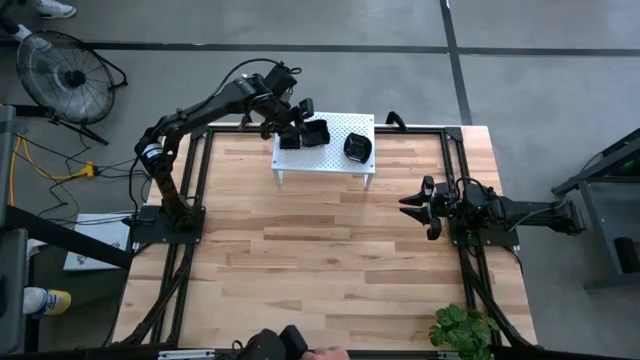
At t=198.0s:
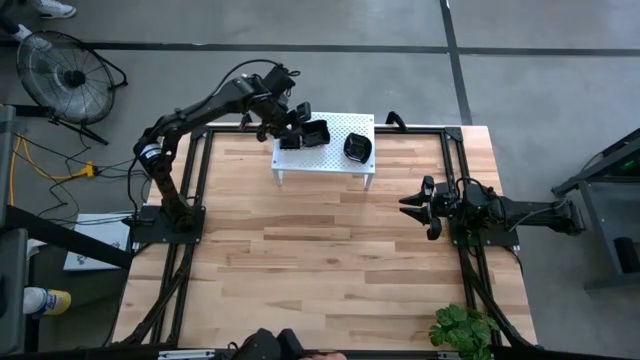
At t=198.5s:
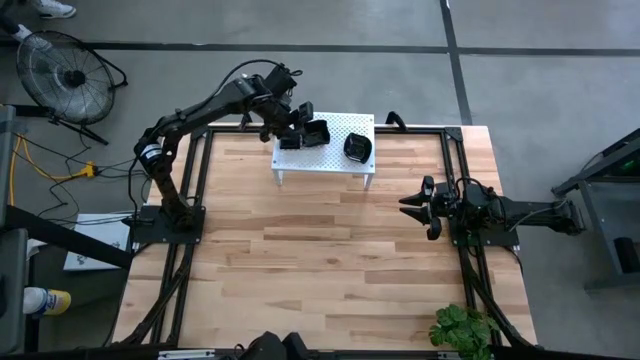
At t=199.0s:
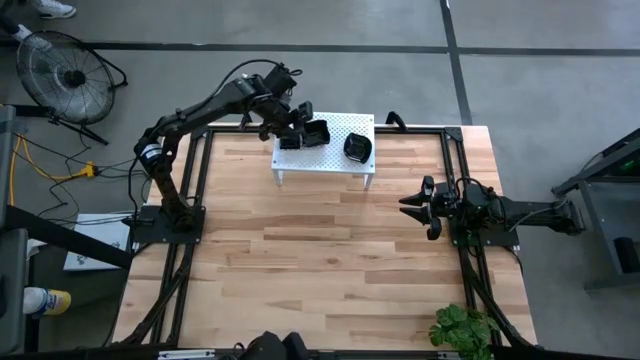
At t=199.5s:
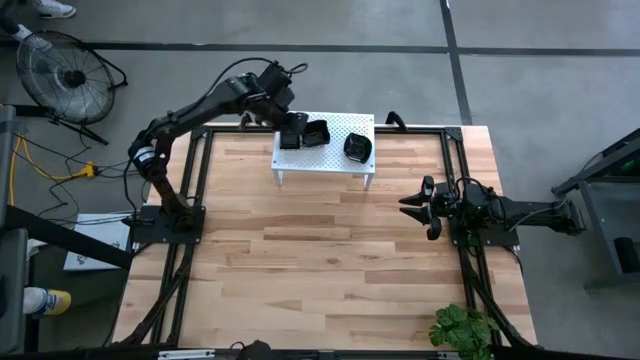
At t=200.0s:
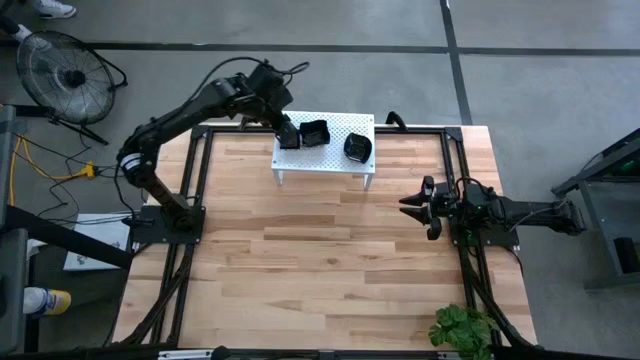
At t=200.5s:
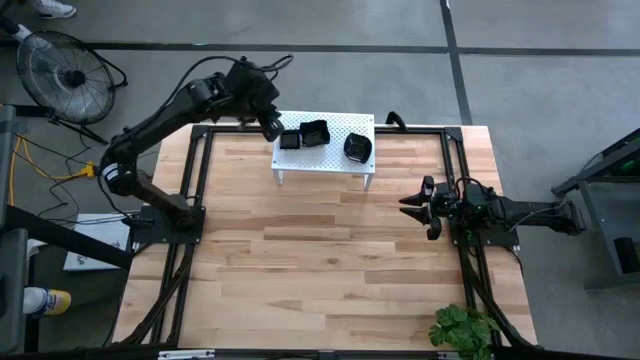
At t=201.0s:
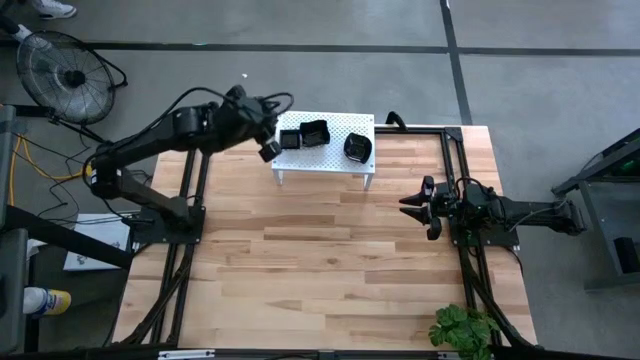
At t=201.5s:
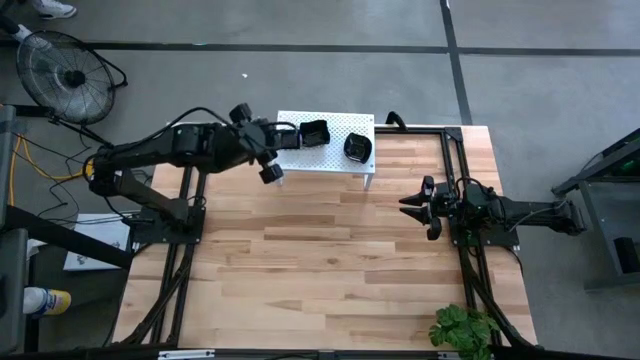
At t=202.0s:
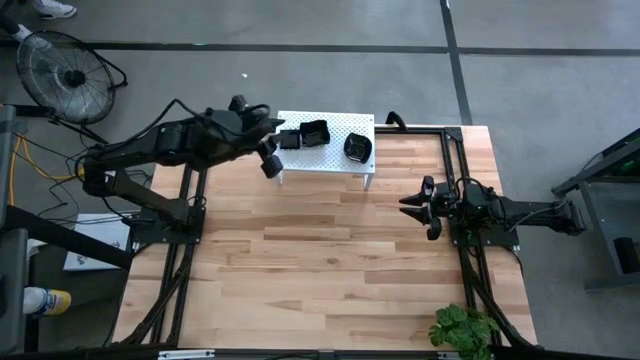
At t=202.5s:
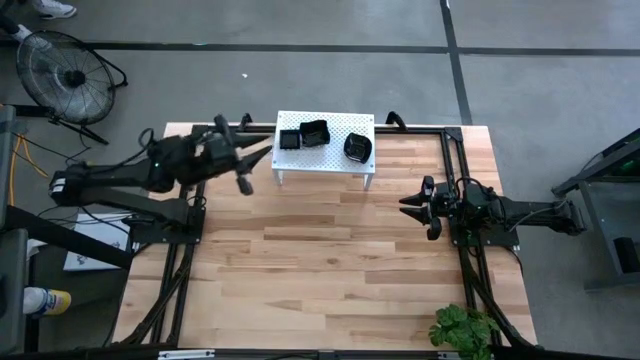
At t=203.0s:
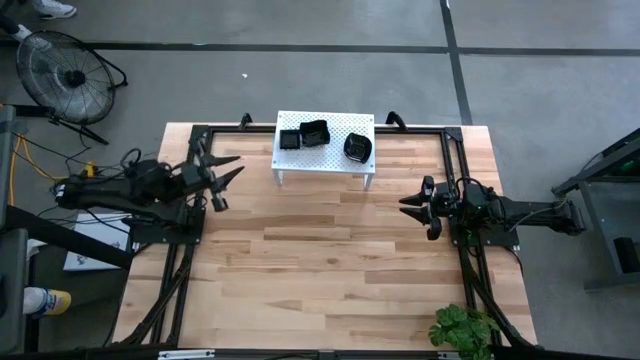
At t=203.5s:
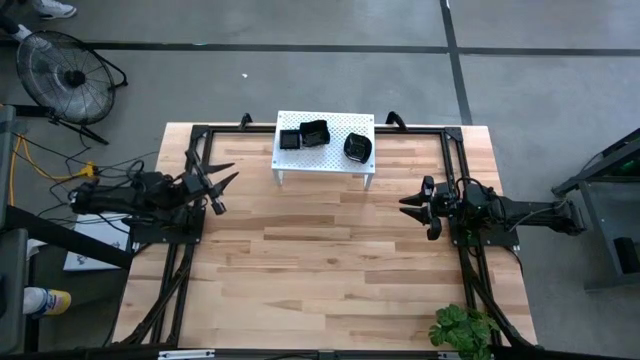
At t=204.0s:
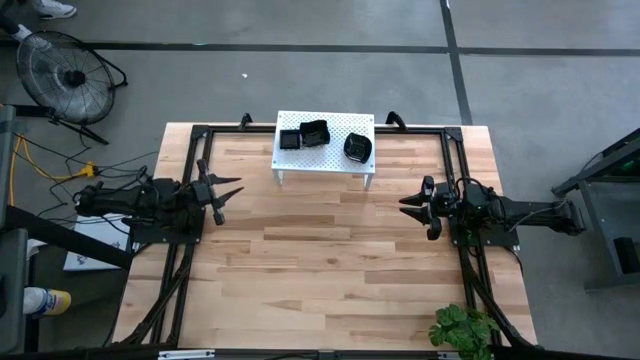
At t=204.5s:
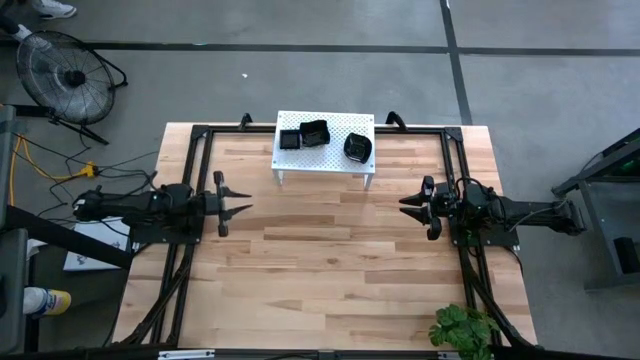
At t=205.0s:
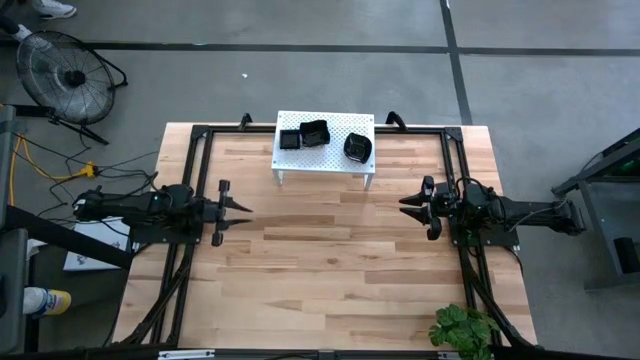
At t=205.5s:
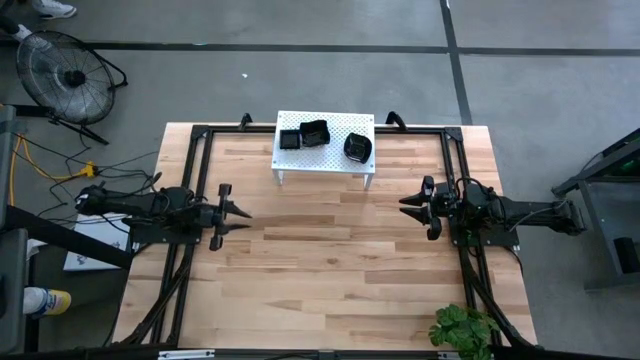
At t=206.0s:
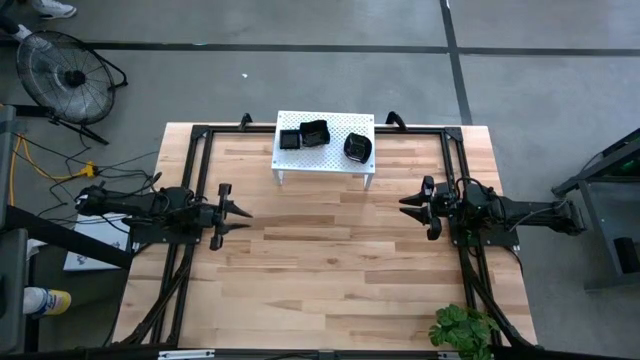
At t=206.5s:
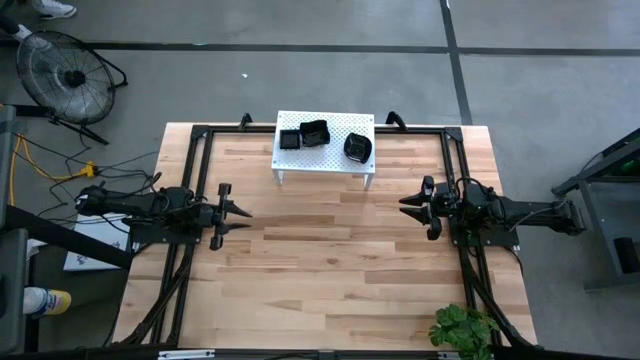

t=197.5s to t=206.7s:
Task: Pick & Place Mini shaped plates
Return to Home Position

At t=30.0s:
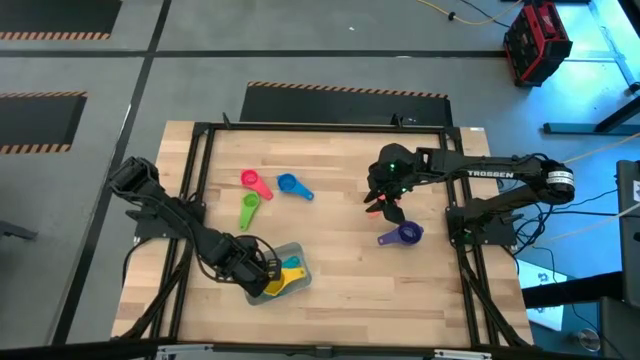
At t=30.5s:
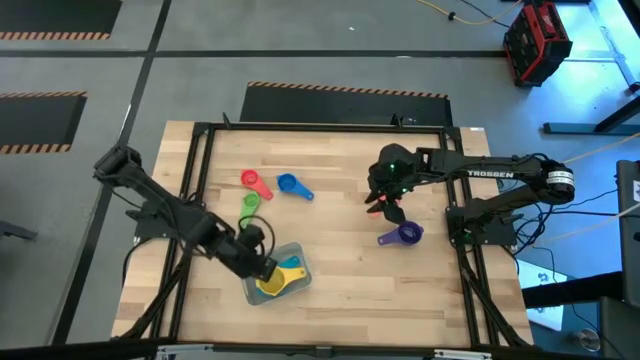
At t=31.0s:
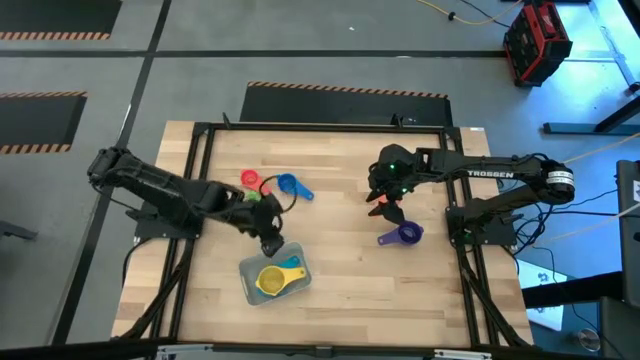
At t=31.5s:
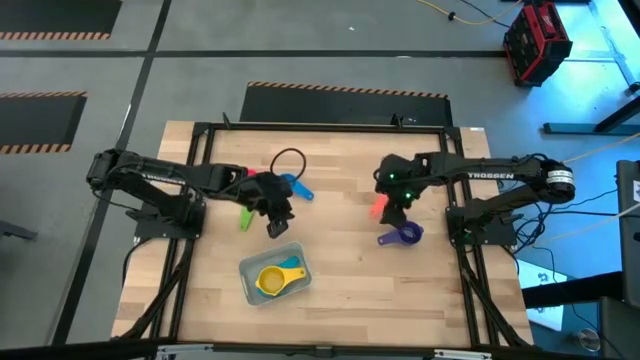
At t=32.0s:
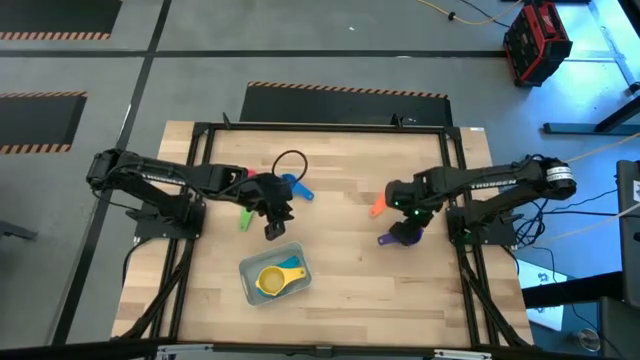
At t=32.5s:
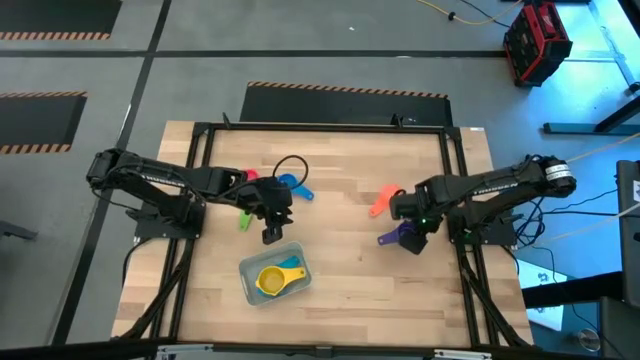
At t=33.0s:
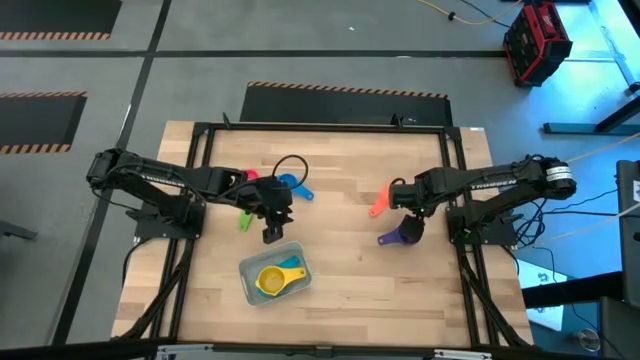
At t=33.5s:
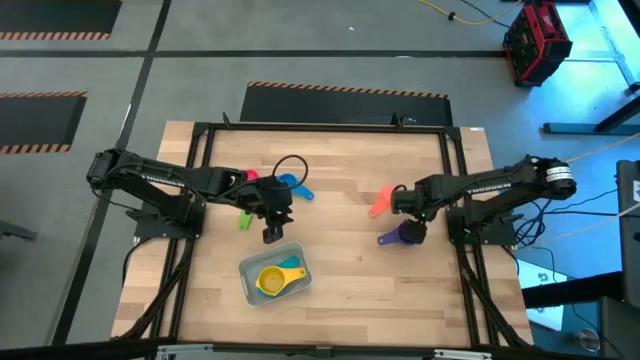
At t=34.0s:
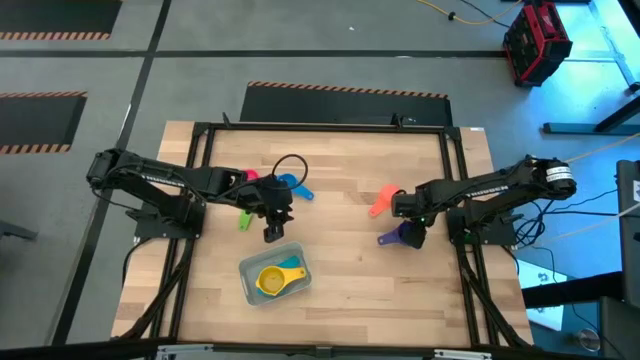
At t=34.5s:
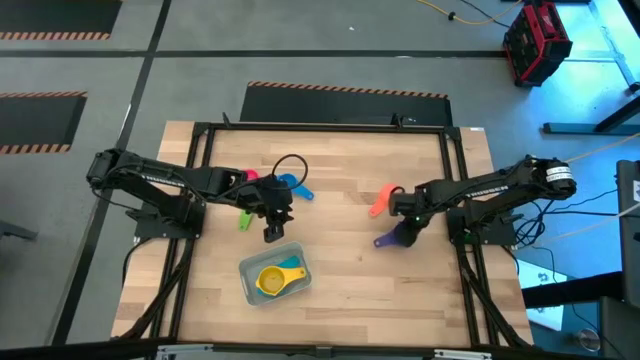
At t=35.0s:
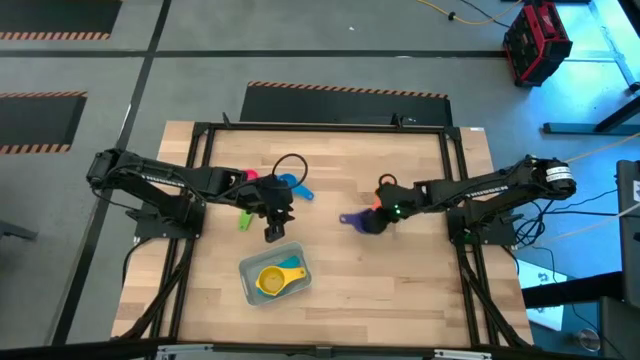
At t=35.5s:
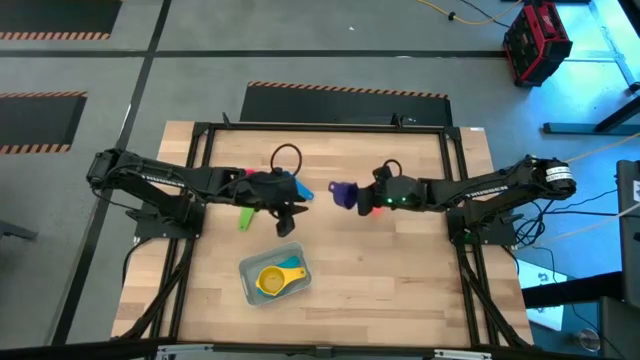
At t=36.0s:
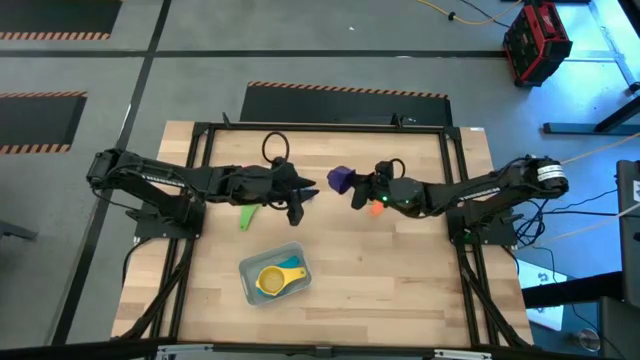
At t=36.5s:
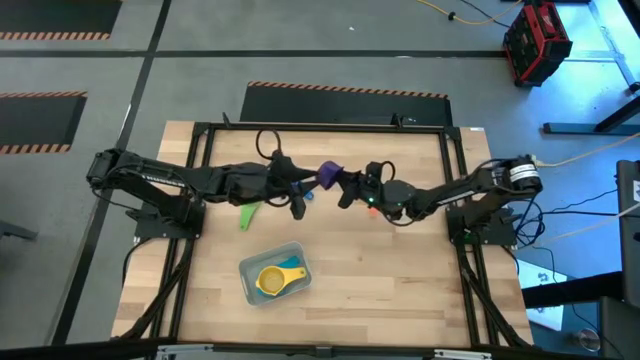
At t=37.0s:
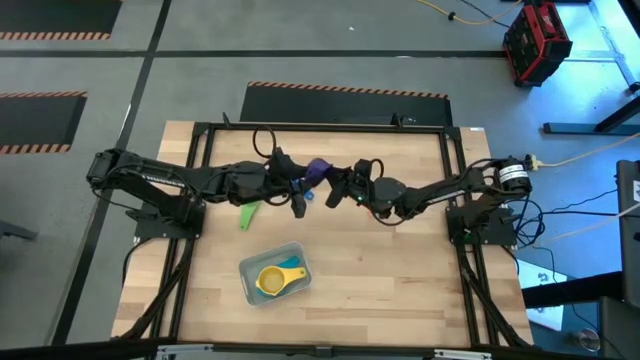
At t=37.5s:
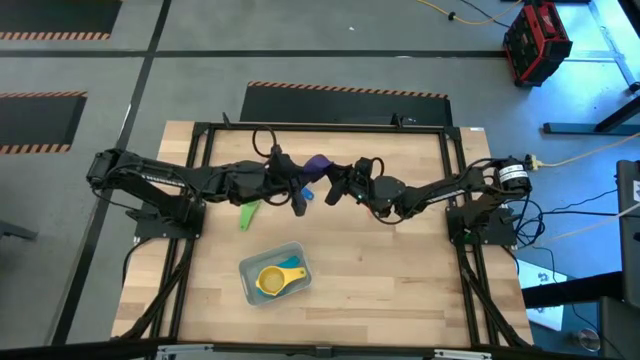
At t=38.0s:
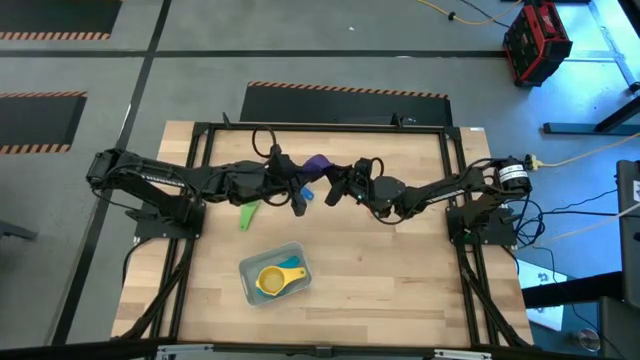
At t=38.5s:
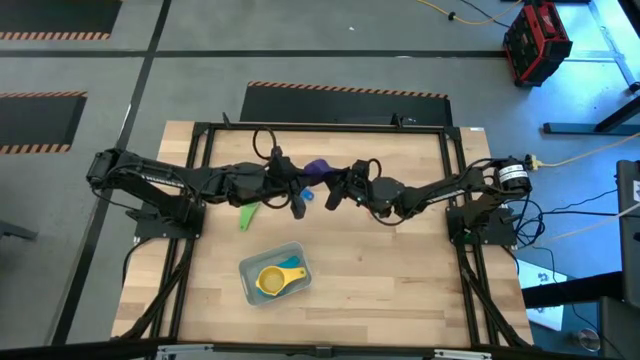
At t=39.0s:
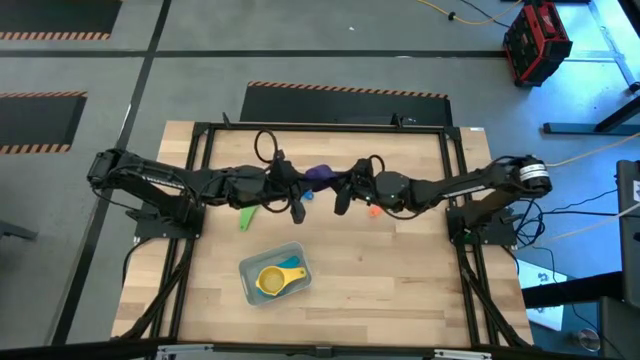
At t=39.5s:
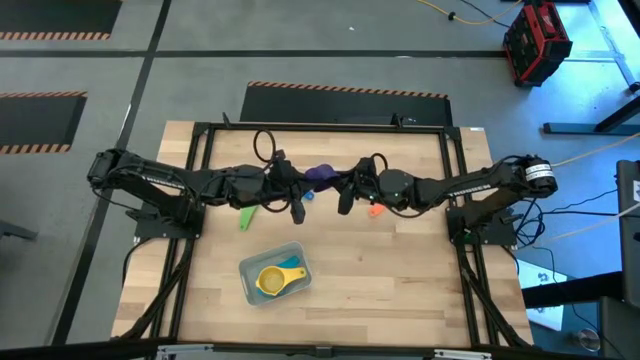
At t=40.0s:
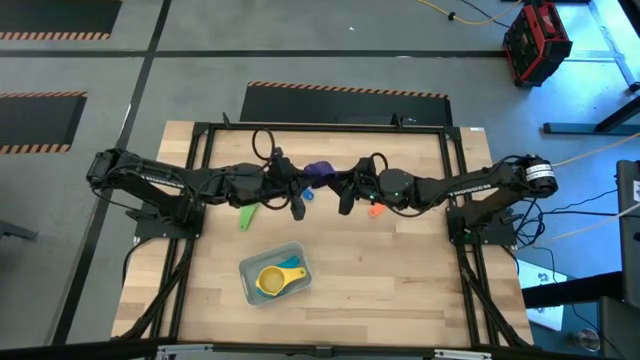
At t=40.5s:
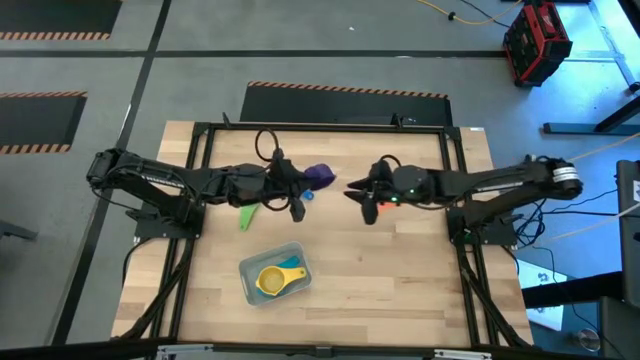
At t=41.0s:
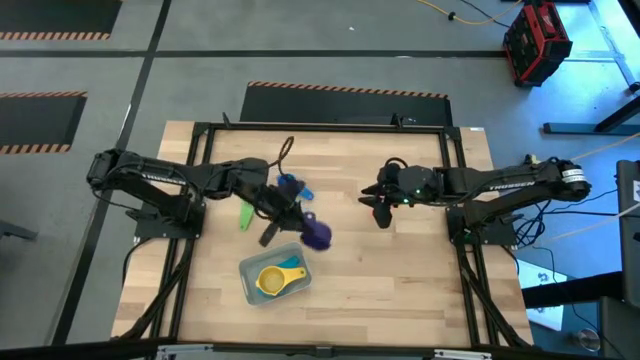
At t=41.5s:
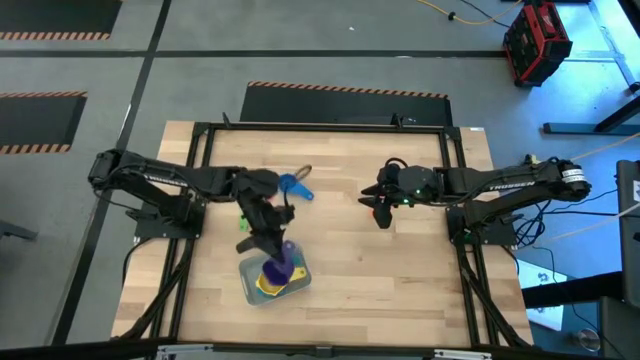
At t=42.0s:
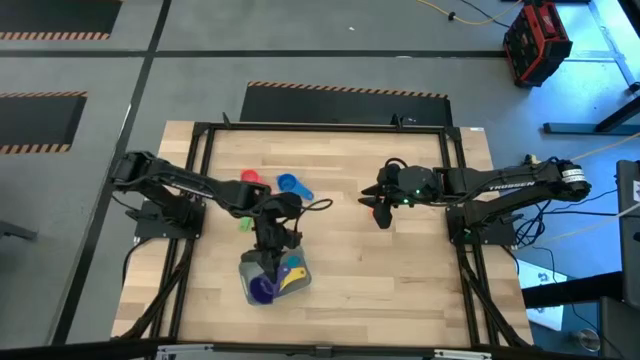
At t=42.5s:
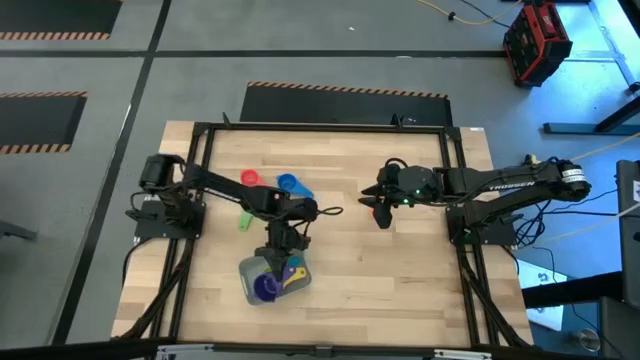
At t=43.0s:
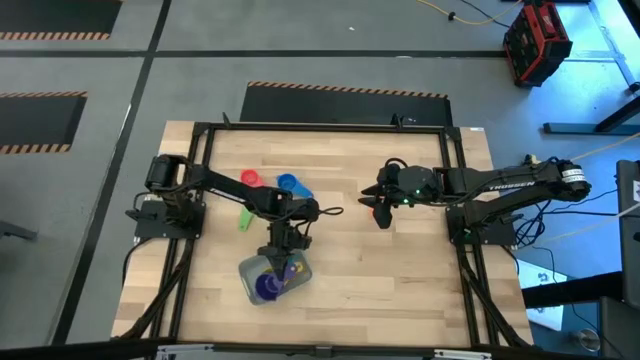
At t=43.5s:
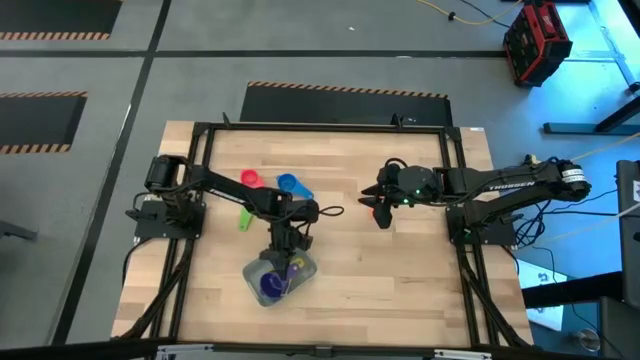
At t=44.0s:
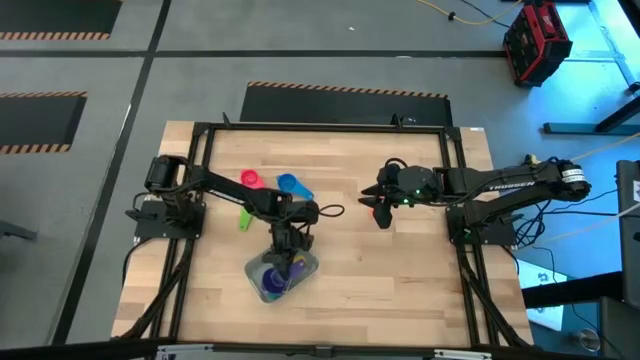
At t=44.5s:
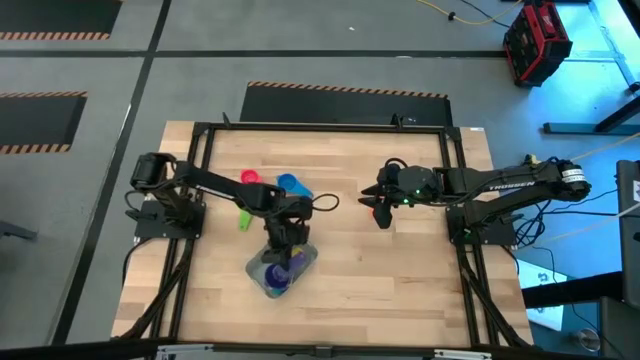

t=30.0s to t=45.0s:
Task: Nest measuring cups in basket
Stack the purple measuring cup into the yellow measuring cup in the grey bin
